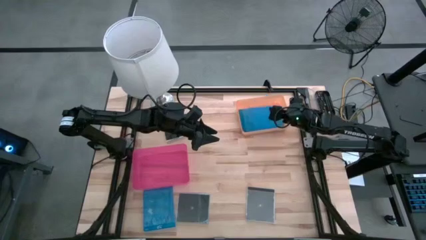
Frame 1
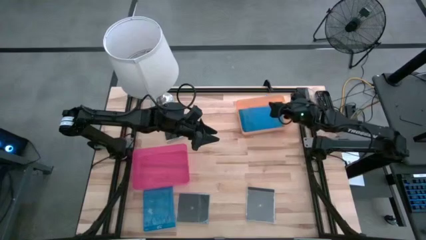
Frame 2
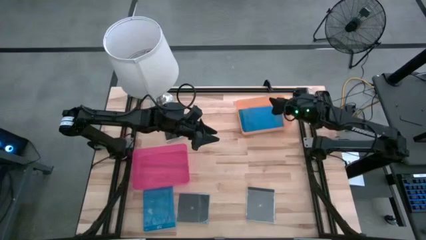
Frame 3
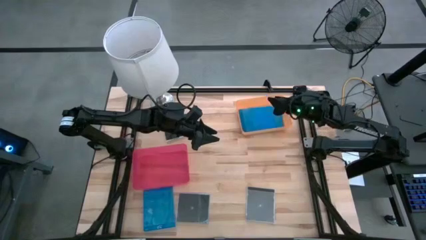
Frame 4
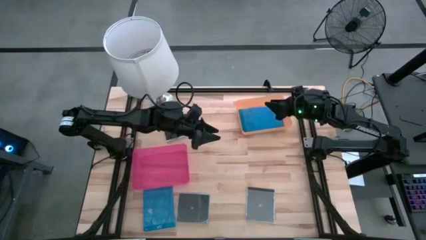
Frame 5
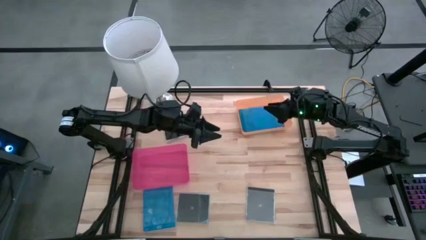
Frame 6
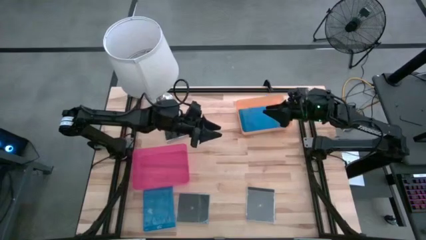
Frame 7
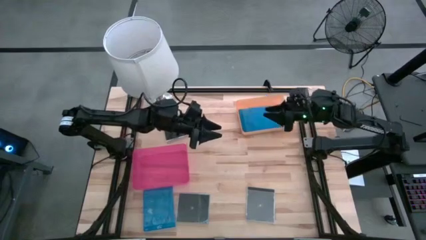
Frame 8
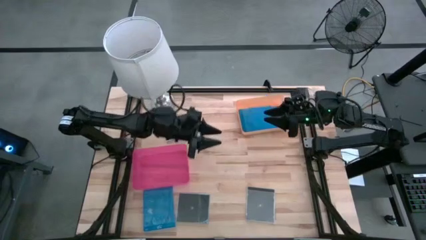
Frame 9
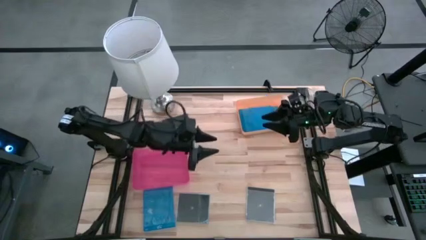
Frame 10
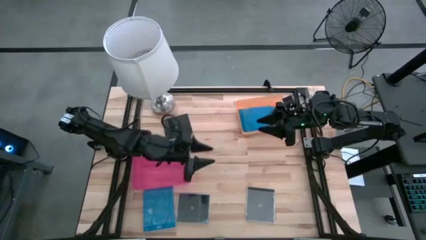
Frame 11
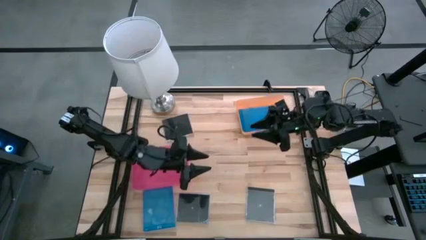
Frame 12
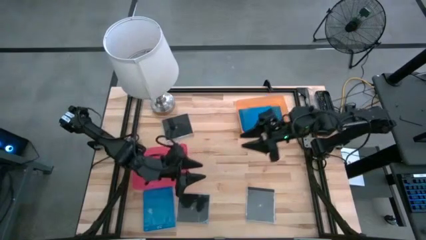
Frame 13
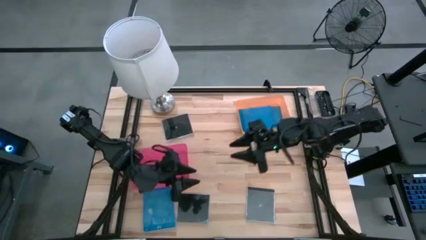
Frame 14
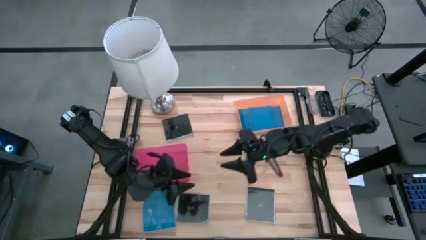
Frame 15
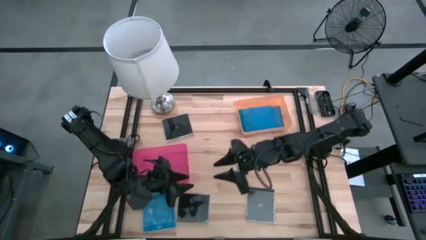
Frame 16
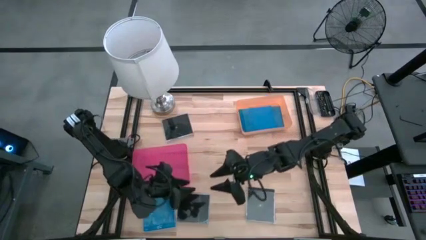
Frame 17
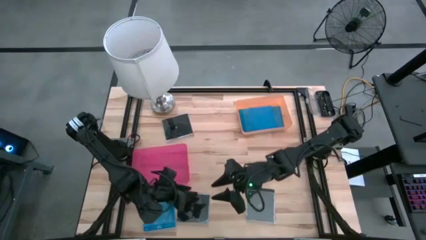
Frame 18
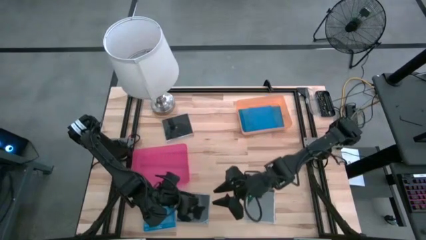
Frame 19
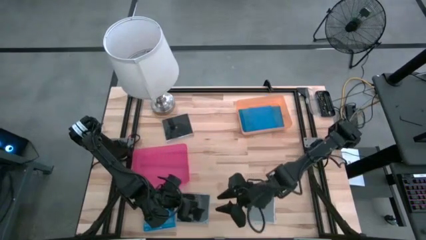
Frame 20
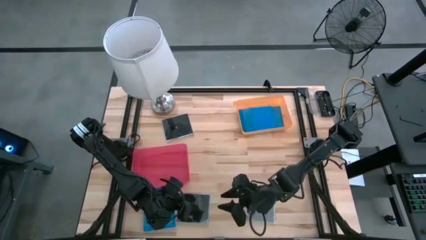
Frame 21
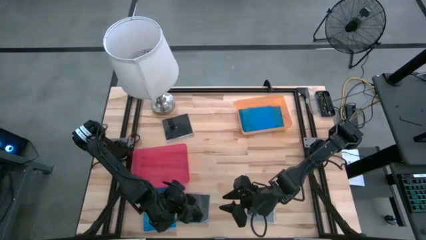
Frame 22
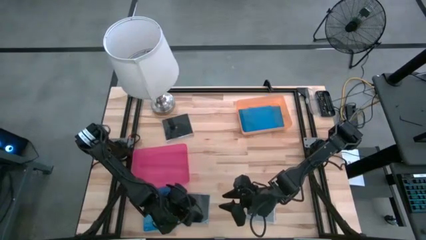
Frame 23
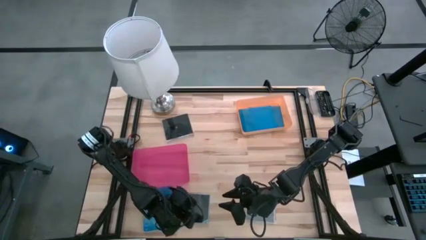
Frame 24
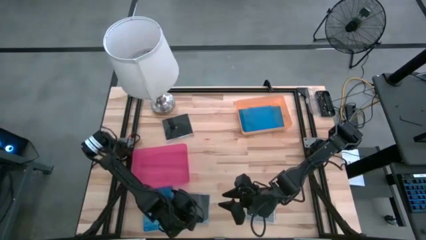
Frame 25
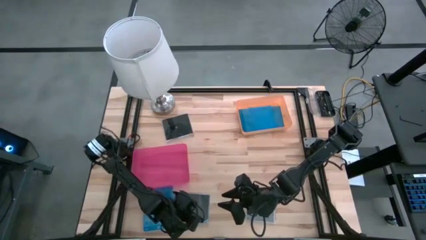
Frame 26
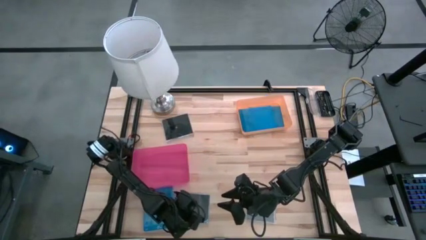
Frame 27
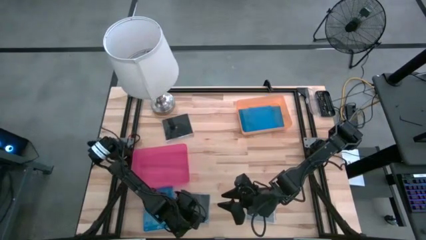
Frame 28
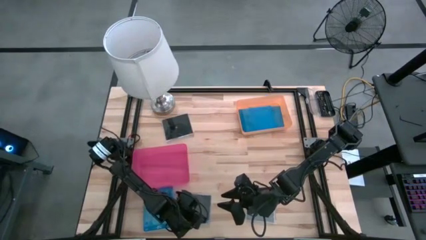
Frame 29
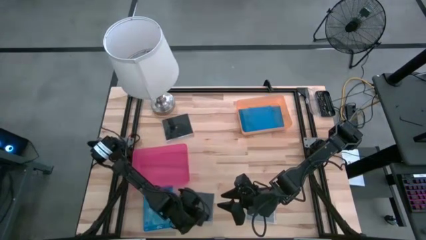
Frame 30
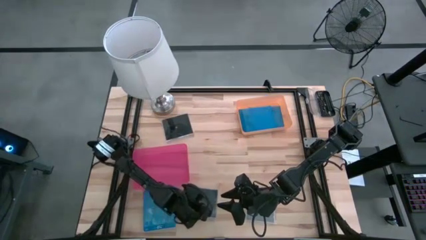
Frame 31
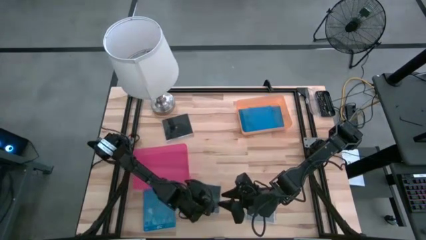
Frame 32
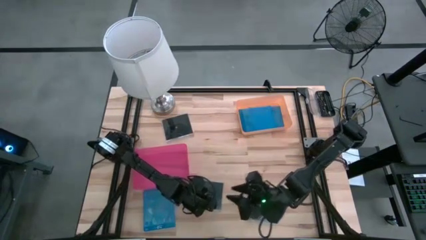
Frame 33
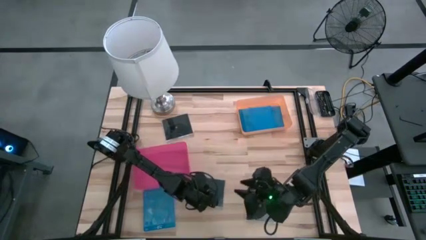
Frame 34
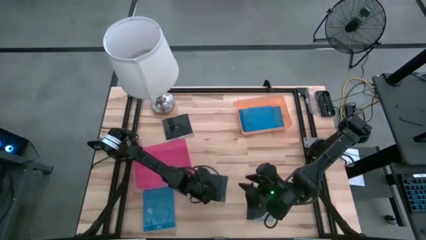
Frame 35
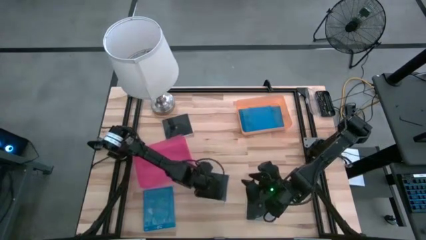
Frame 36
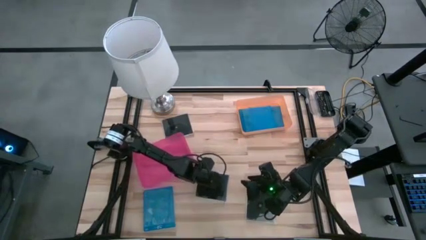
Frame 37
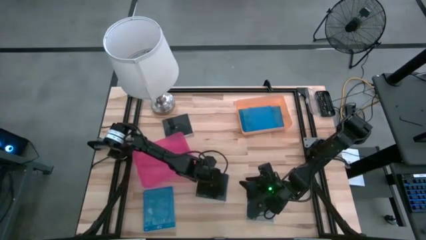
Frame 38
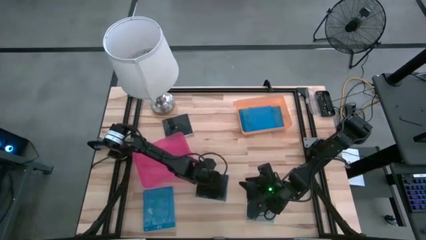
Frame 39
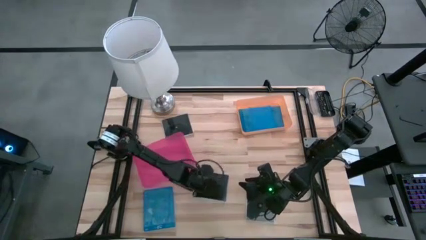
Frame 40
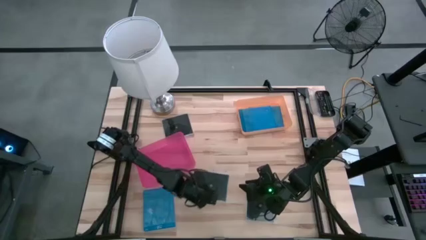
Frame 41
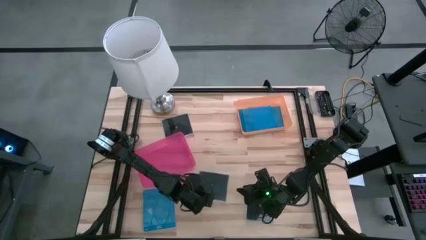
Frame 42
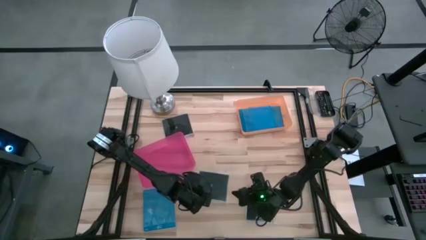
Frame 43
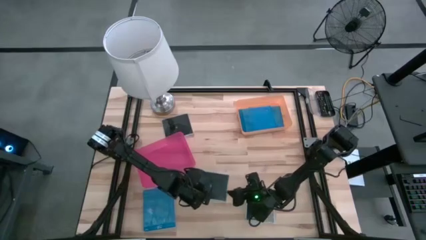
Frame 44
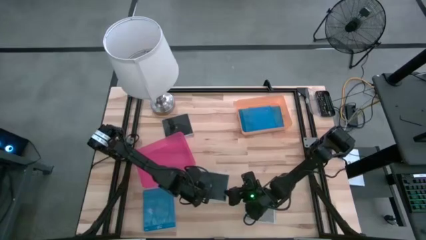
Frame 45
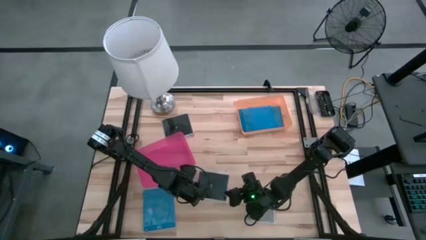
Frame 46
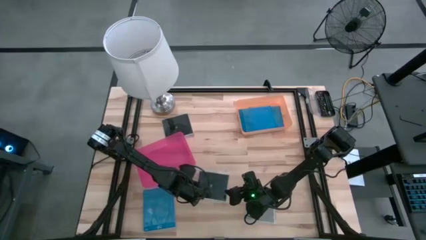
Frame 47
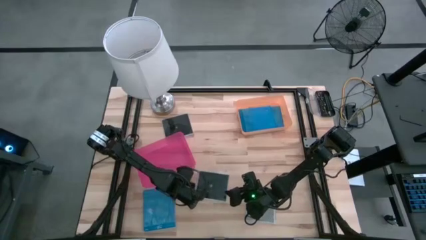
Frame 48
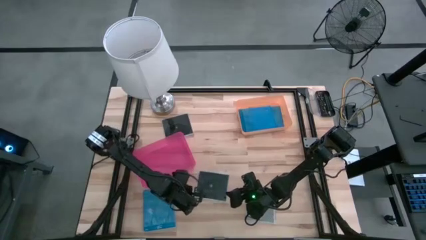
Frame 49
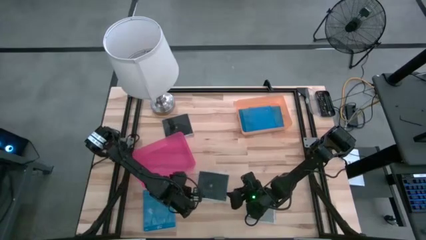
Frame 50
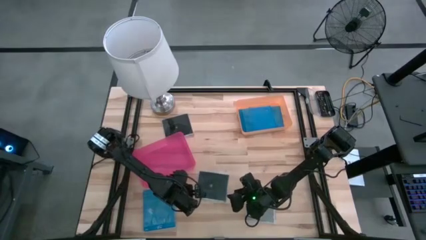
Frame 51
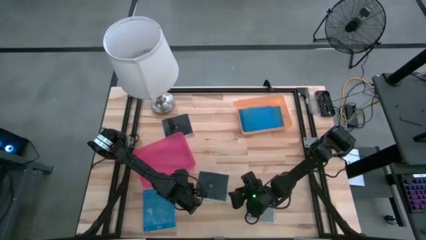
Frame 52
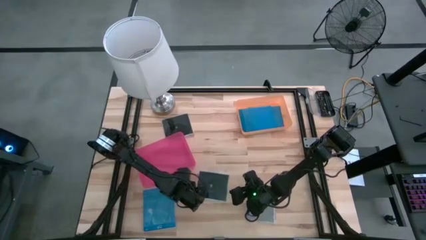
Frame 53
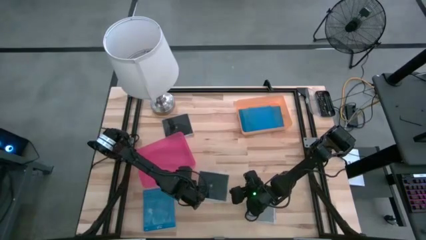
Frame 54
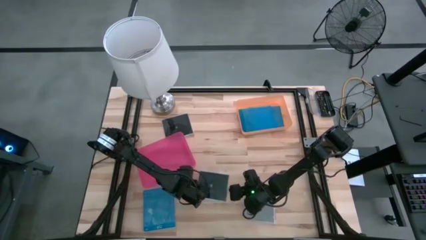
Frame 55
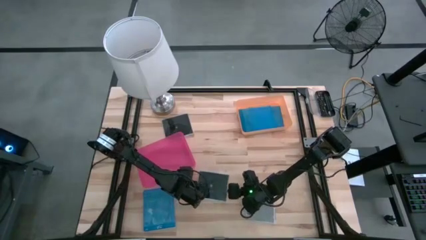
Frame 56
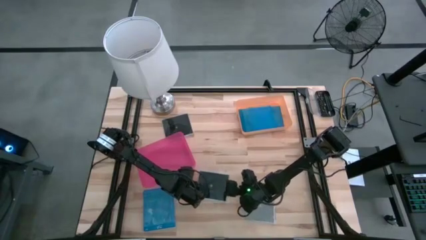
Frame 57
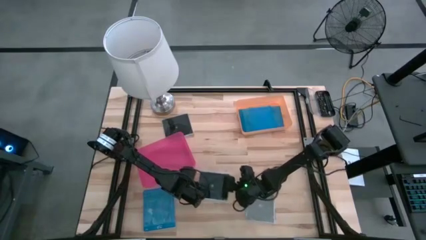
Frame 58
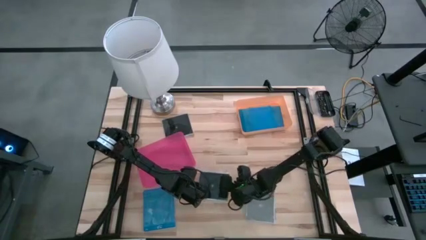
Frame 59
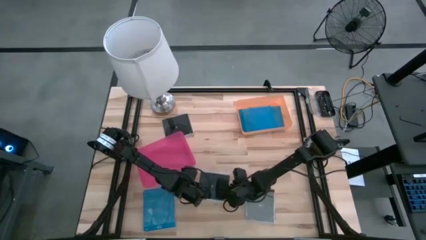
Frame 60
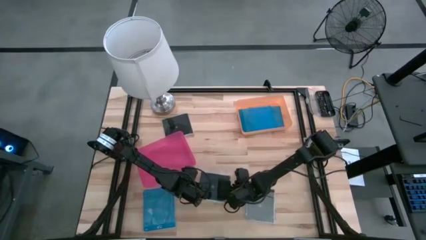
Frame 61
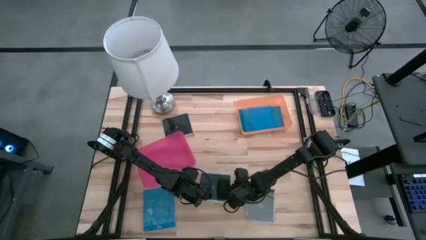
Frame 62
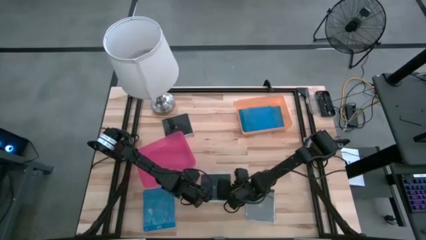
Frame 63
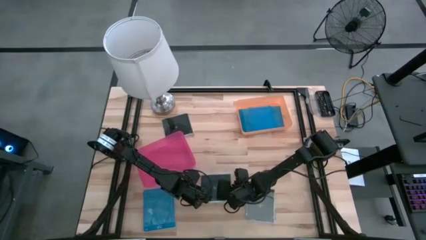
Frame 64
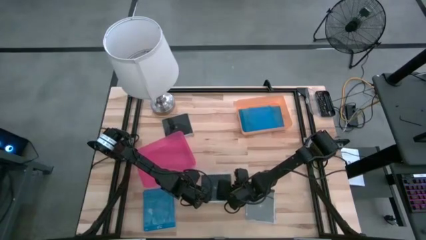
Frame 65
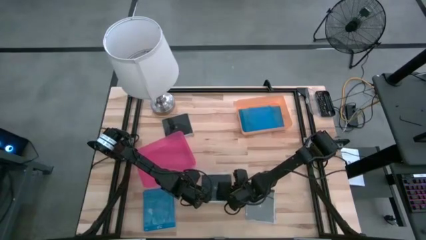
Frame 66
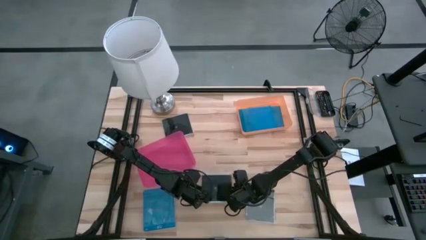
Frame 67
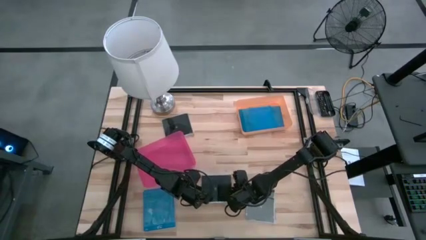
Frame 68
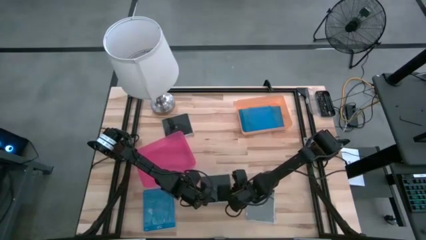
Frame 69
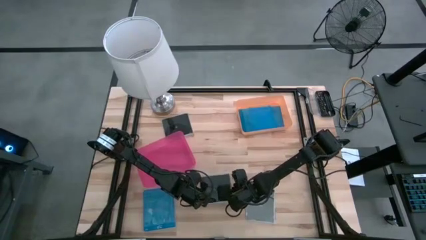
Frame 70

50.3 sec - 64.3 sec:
Task: Pick & place jewel cases by type
Put the bottom left black CD case into the pink bin
